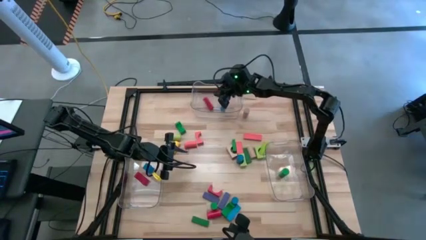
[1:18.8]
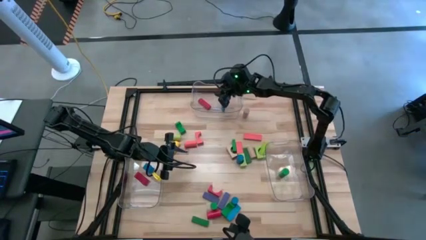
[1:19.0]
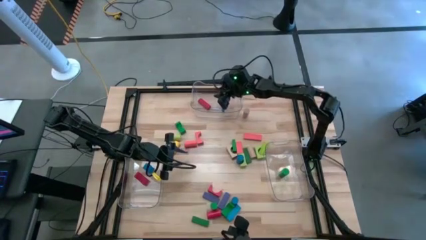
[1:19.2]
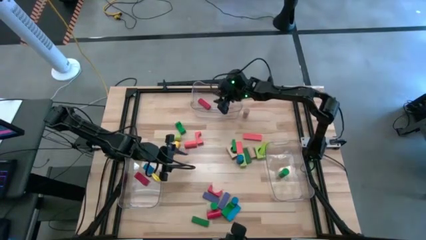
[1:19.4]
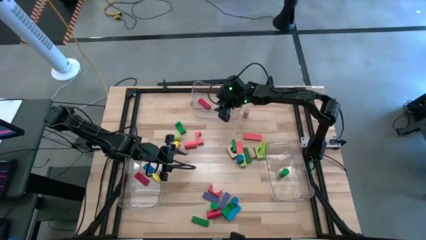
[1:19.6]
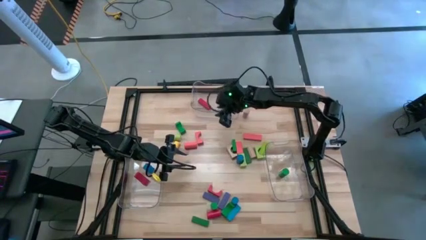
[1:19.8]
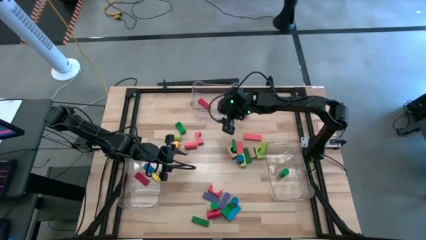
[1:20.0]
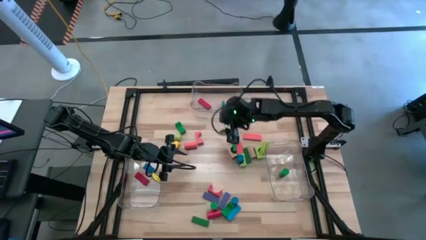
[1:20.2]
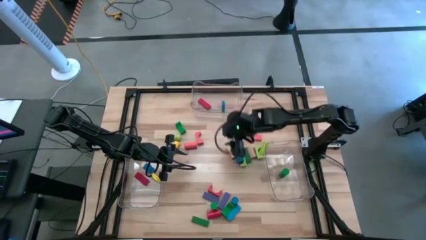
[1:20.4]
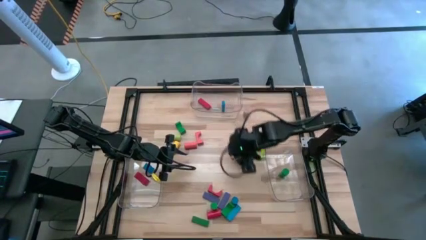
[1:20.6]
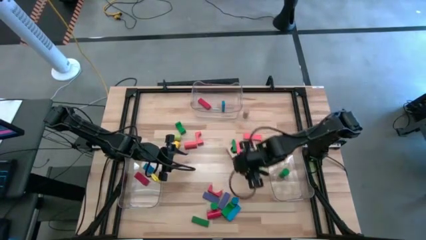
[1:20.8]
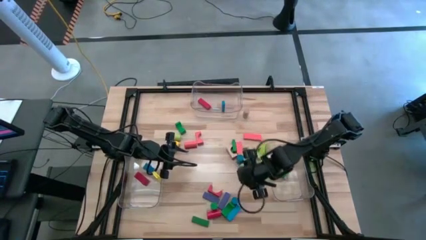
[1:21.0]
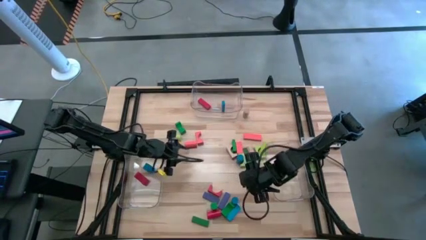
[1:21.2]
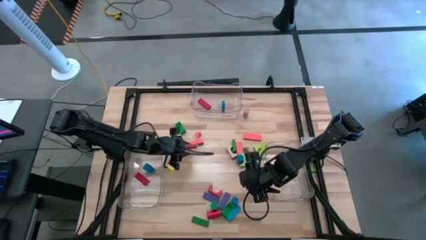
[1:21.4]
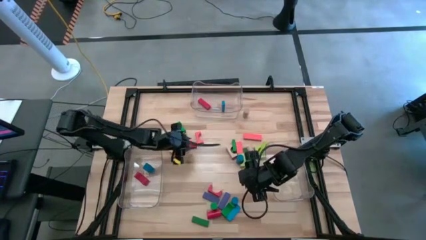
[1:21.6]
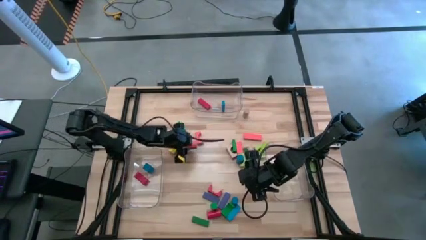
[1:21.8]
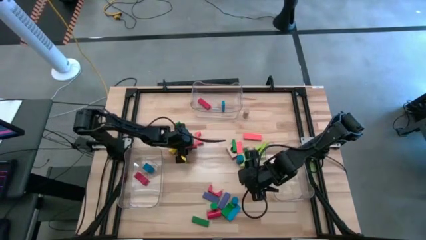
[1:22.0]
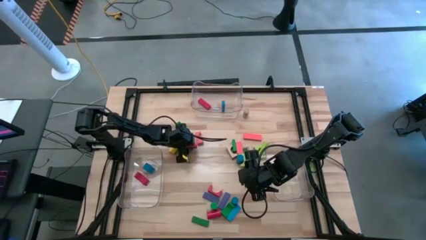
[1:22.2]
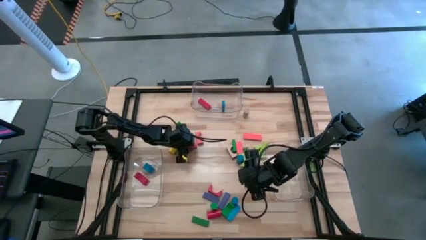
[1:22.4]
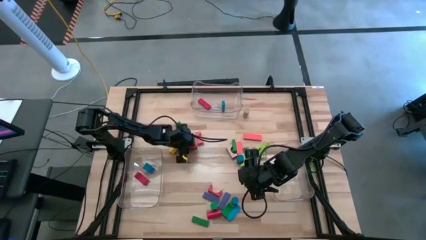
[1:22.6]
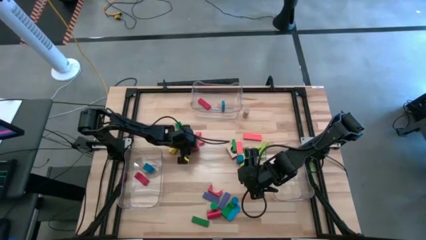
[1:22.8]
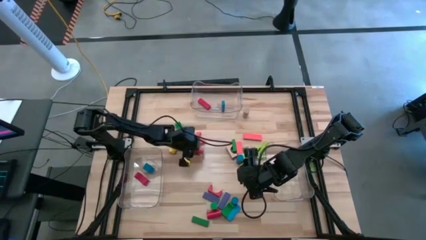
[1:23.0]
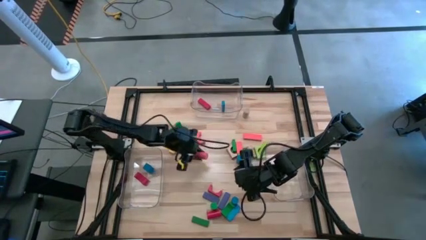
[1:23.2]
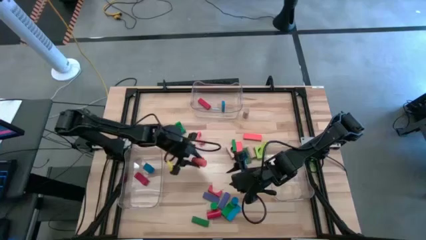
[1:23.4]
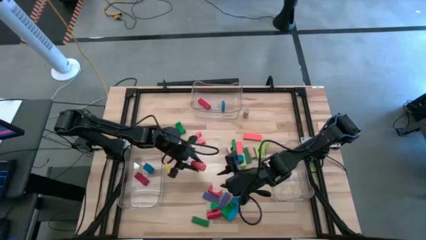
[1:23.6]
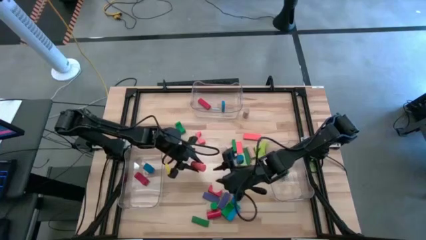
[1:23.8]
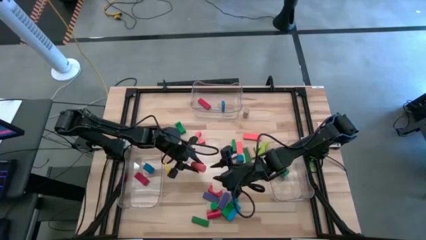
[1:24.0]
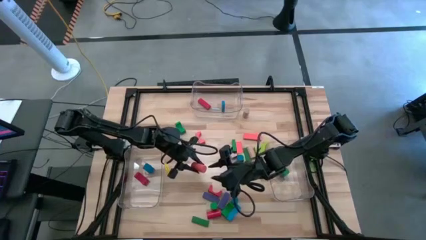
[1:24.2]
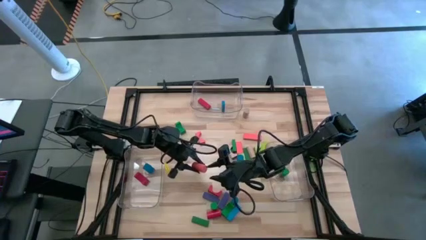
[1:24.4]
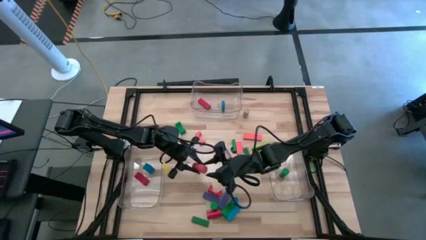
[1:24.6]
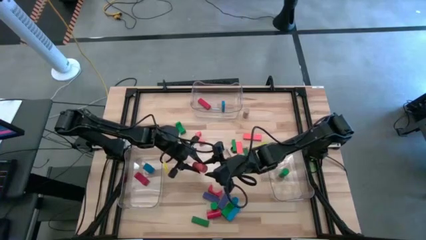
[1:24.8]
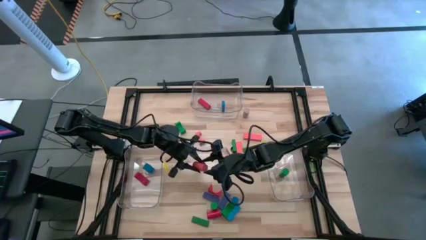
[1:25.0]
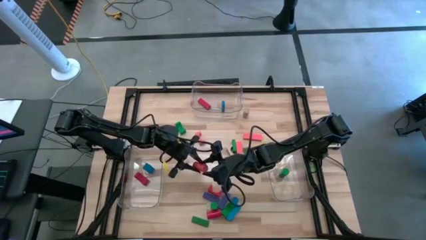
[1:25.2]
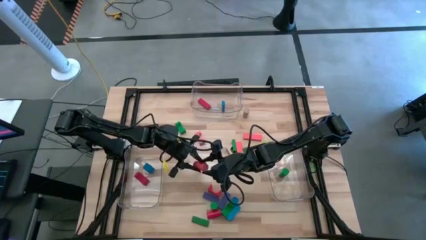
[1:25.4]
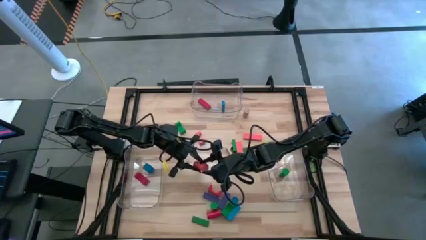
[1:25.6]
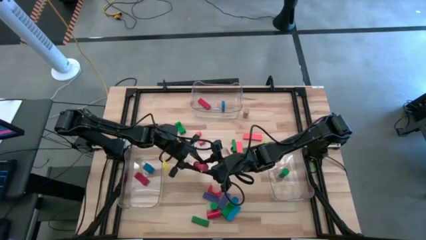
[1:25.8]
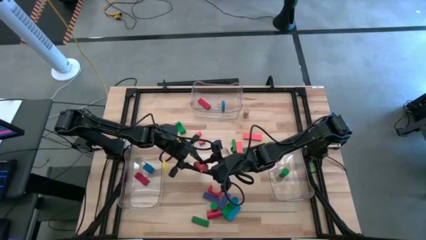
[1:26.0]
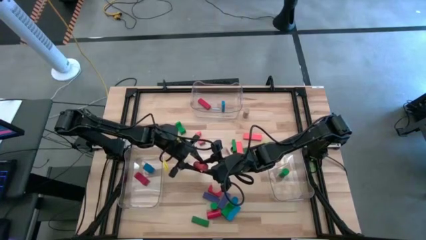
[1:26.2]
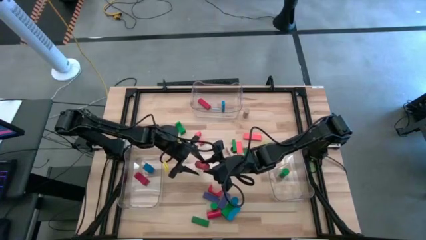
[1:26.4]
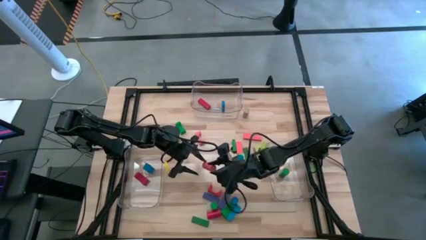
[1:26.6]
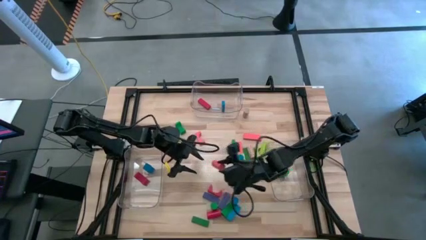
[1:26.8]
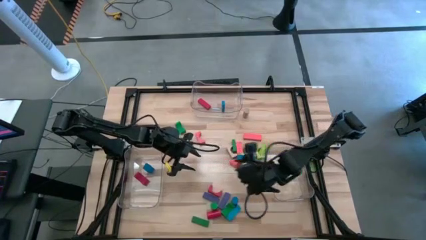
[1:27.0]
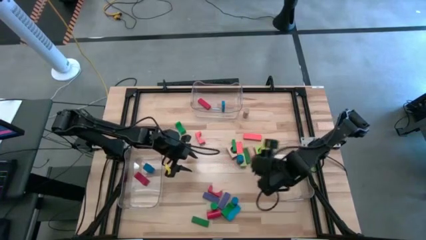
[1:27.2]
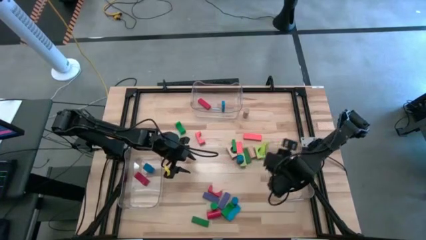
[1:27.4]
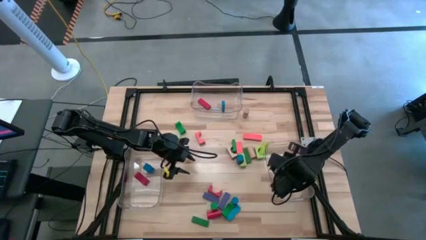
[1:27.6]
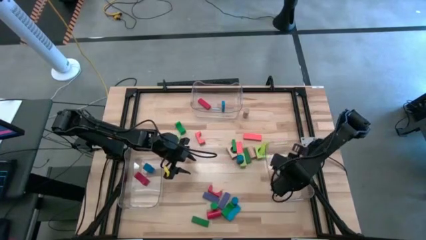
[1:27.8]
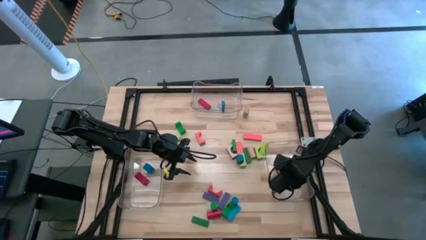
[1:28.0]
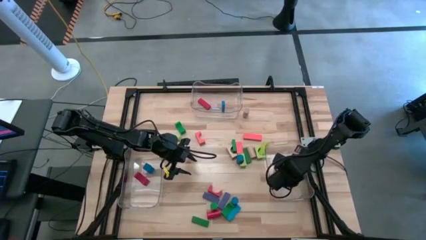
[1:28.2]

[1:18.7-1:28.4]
Task: Sort blocks by size
Put the orange cylindrical block into the right transparent bin
